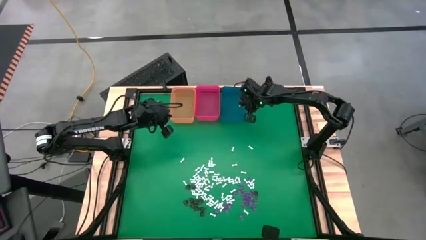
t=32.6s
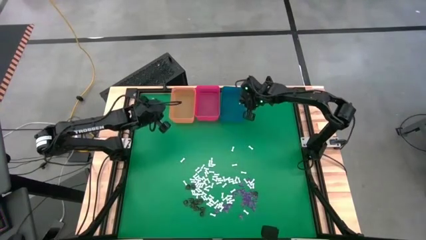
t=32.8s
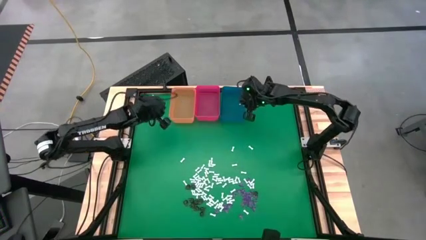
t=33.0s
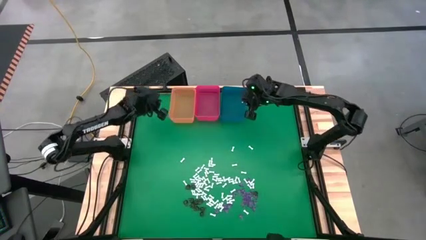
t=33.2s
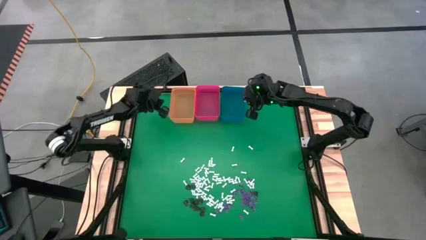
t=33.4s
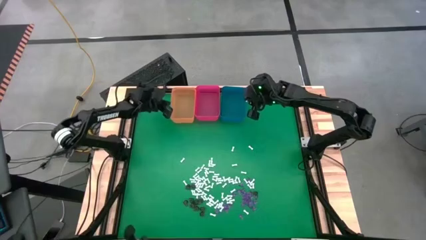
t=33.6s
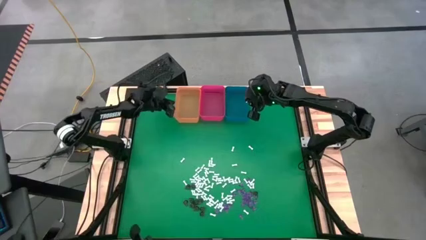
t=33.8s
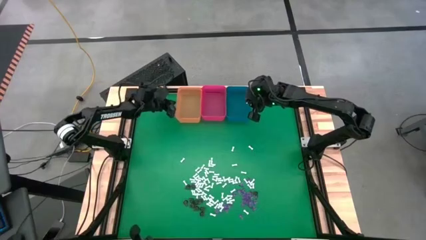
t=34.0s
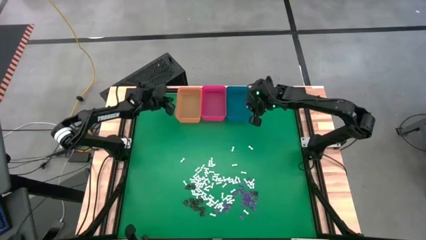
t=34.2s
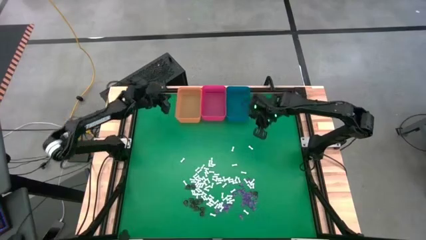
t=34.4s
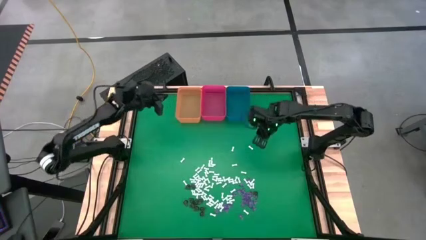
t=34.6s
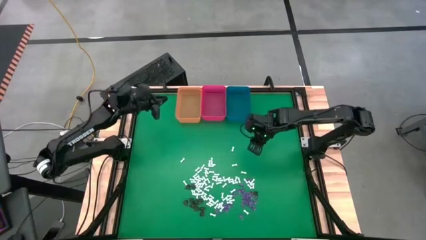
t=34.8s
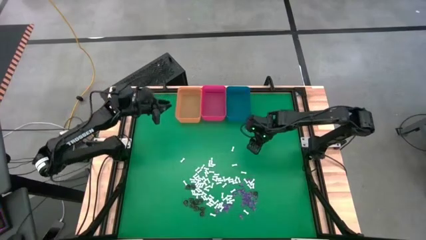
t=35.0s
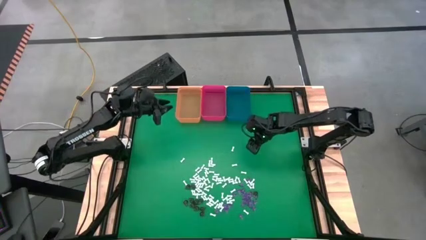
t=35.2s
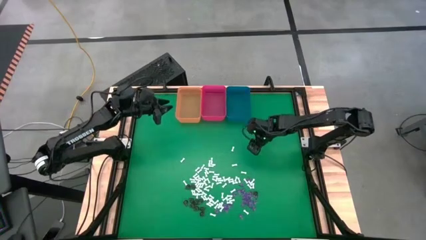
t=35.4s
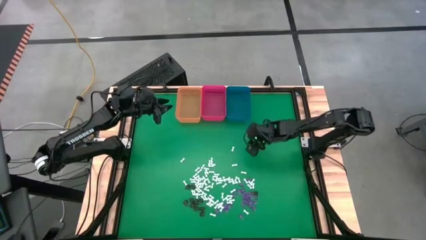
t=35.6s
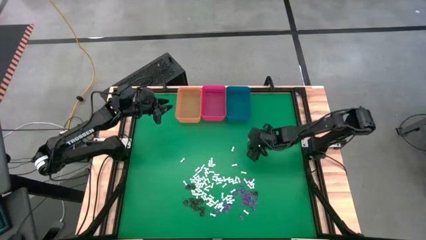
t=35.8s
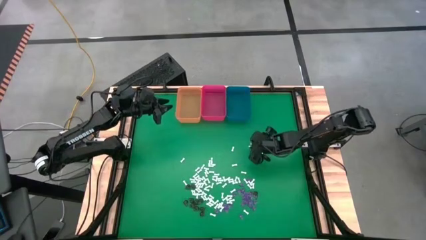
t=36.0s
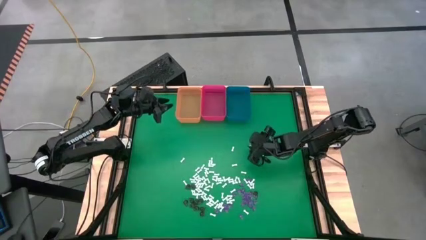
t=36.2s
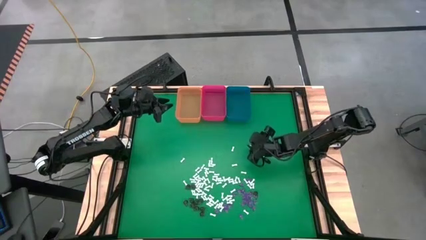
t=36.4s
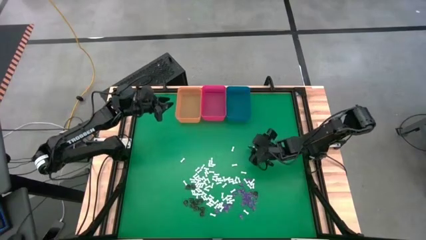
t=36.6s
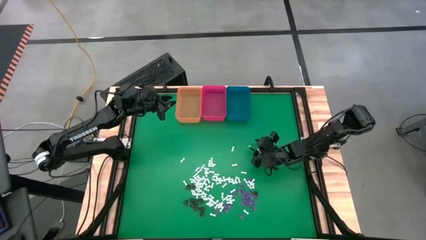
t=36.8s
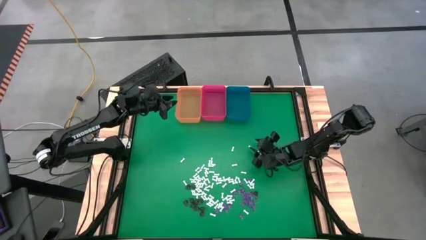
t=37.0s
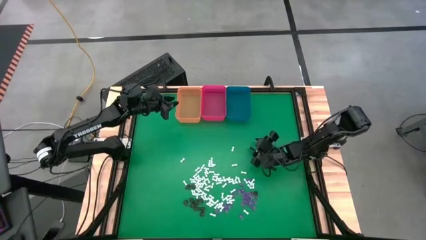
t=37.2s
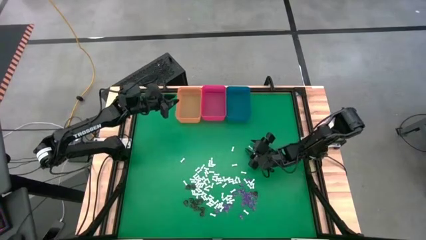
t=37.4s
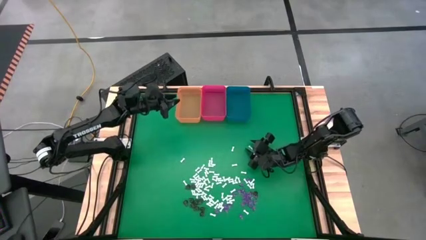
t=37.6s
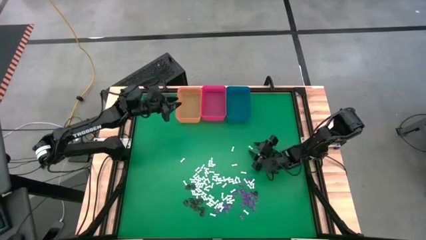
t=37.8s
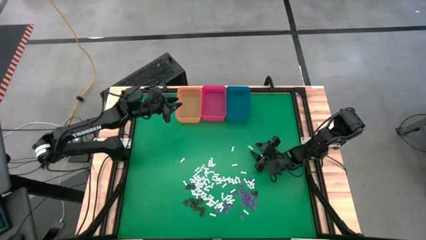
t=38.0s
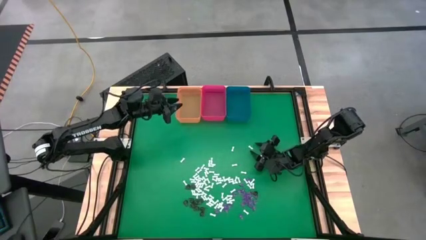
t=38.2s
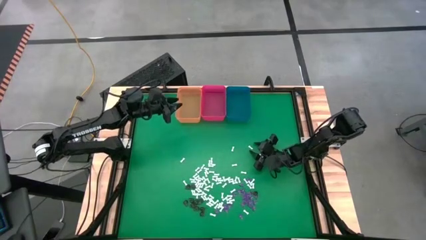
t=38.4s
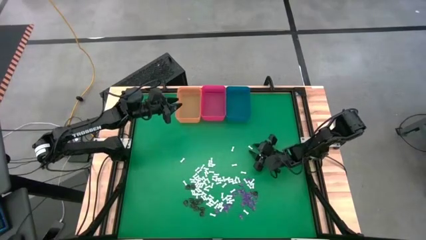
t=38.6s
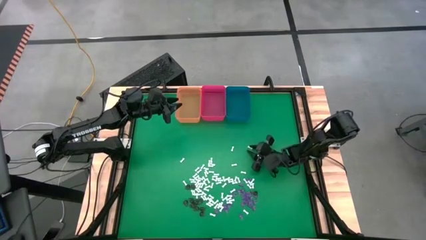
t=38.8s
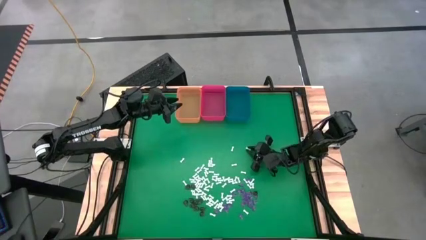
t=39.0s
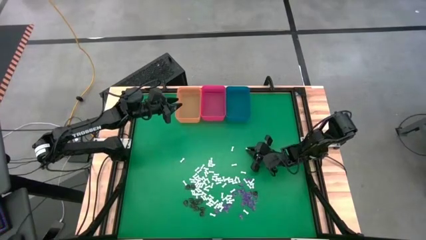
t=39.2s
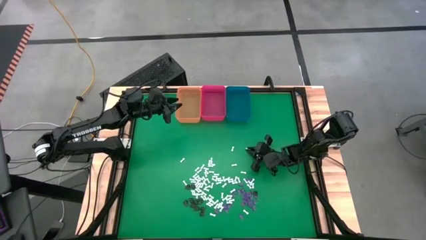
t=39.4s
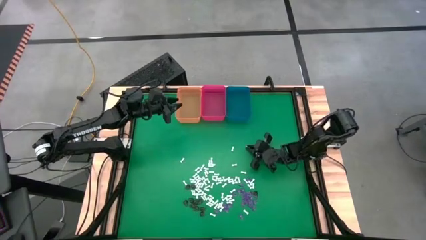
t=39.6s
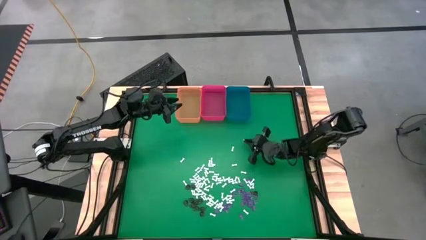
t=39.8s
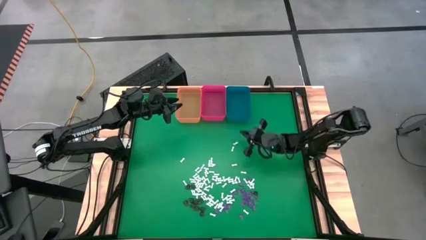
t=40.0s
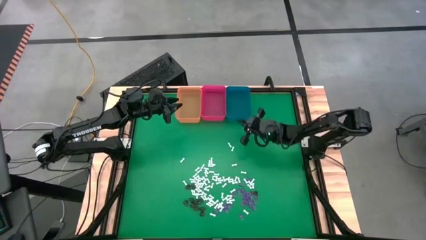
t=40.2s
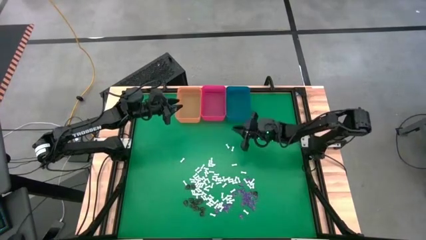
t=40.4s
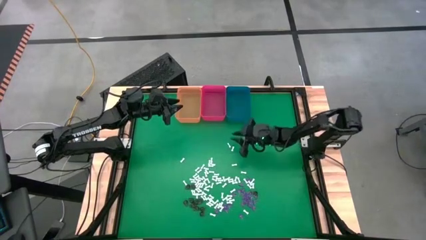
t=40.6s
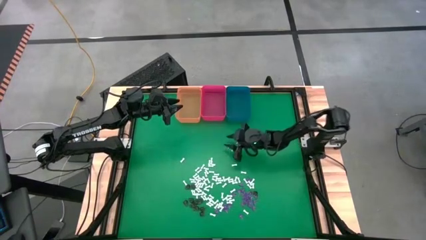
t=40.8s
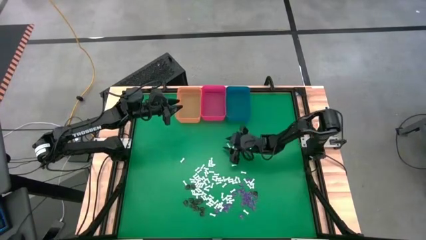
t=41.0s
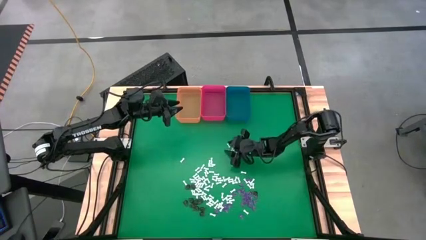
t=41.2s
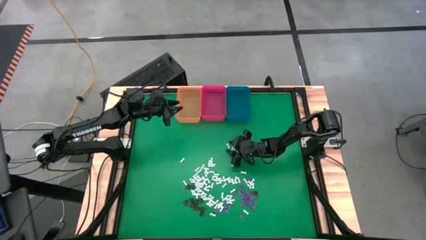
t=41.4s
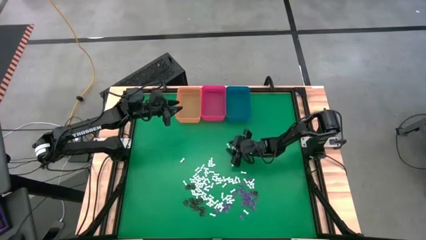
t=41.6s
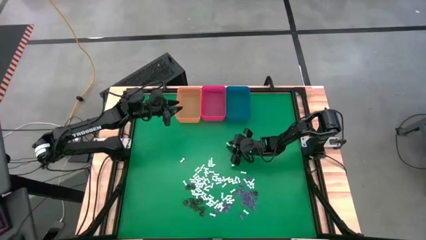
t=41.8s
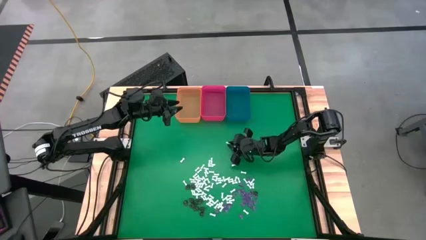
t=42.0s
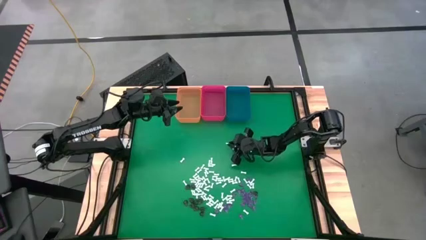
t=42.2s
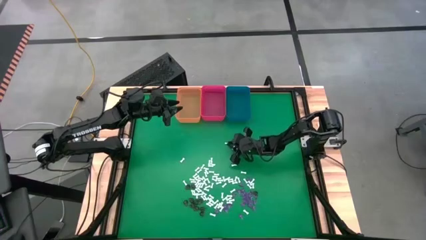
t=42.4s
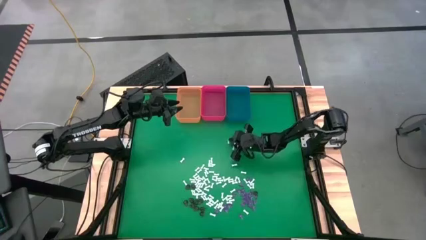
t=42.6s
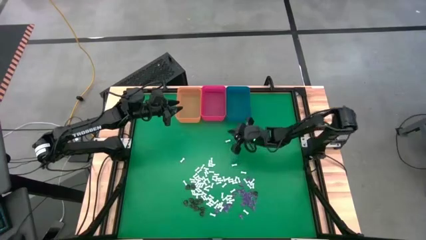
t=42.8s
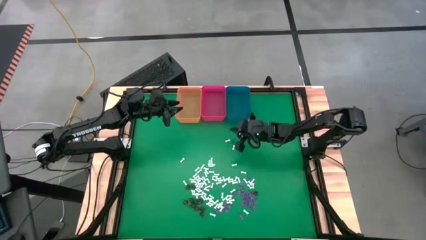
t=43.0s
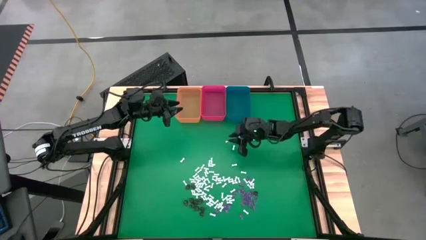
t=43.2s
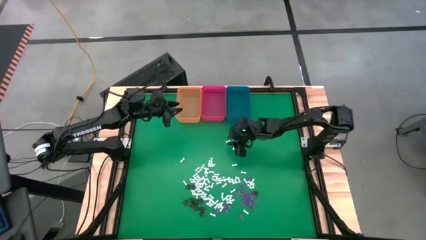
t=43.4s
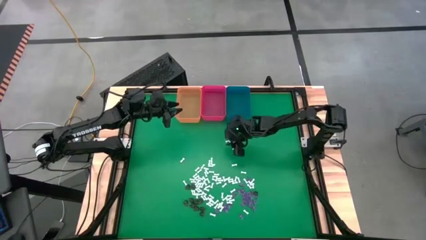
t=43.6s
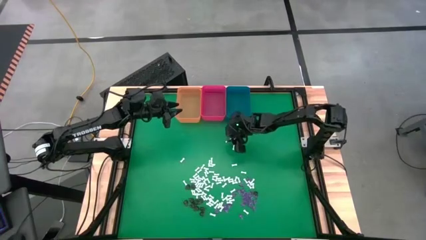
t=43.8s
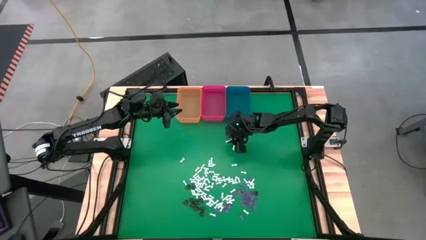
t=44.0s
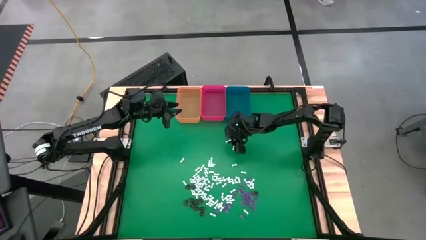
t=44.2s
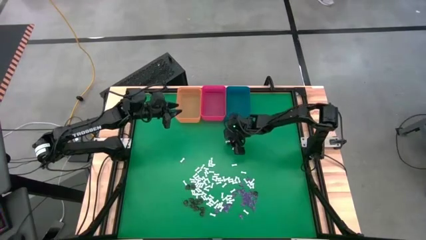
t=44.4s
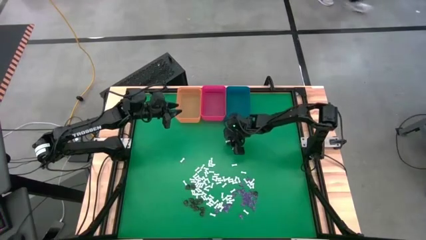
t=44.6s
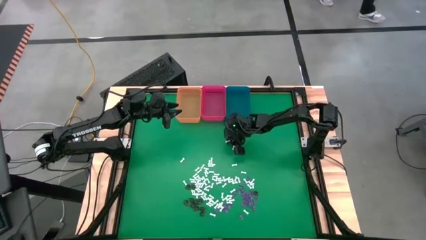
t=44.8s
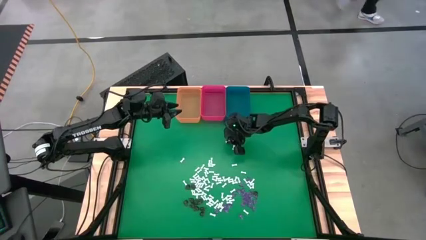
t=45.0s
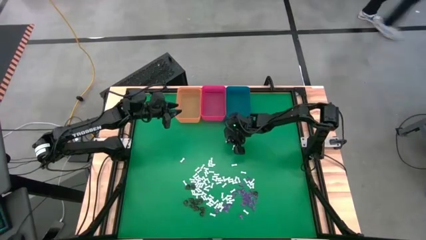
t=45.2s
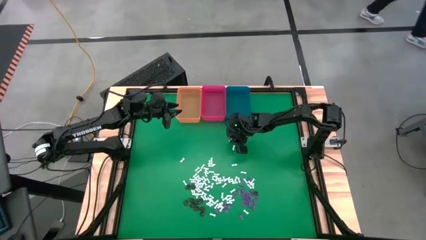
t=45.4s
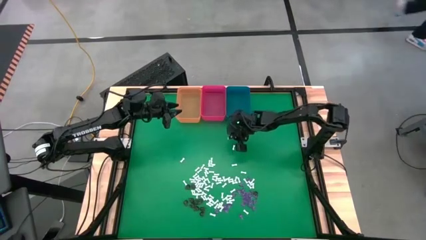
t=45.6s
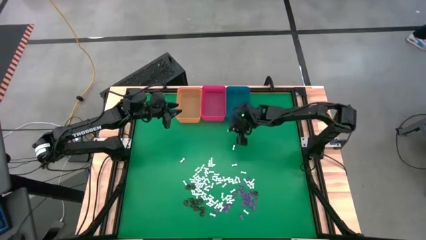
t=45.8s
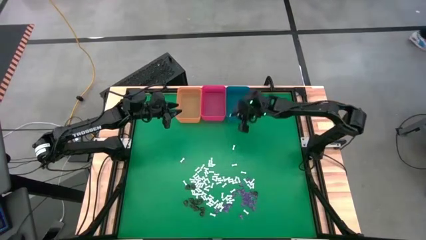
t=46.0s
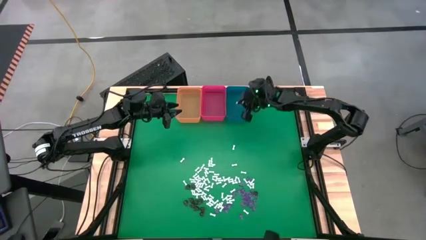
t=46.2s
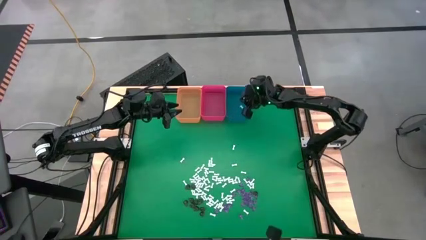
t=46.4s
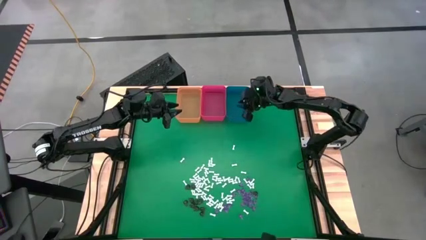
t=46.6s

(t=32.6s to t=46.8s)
Task: Sort Halloween decoration
Put the white bone toy into the blue bin

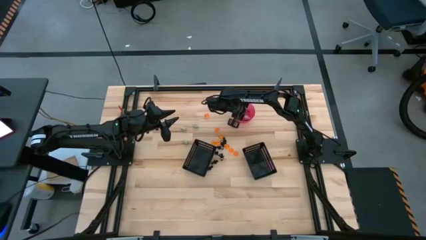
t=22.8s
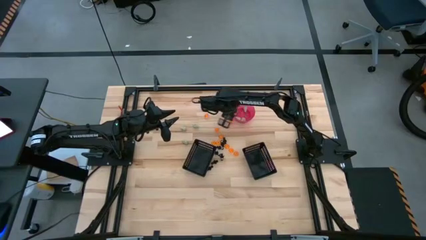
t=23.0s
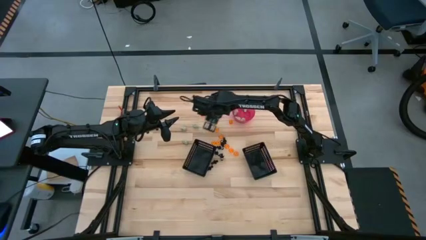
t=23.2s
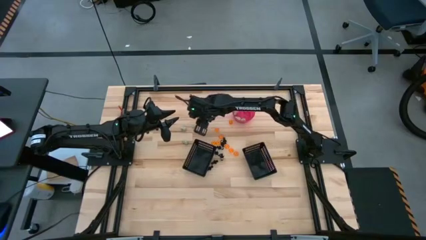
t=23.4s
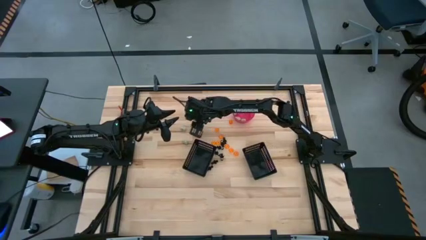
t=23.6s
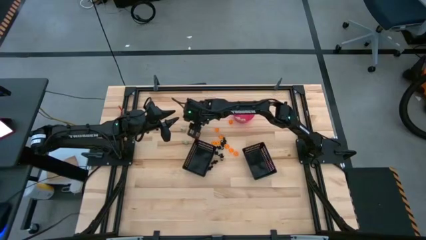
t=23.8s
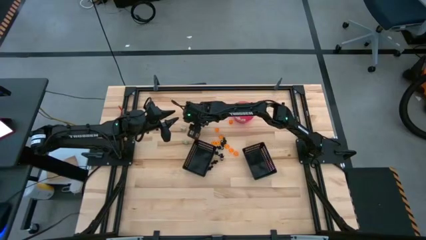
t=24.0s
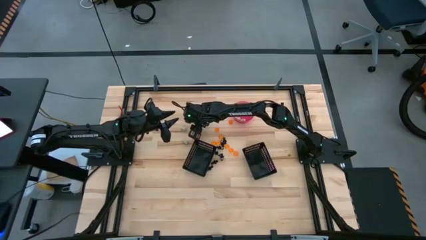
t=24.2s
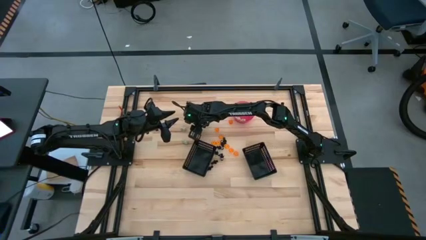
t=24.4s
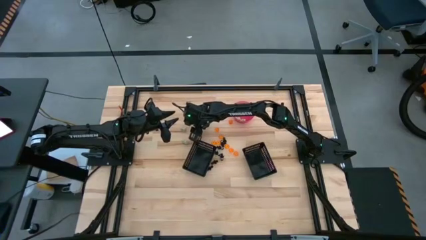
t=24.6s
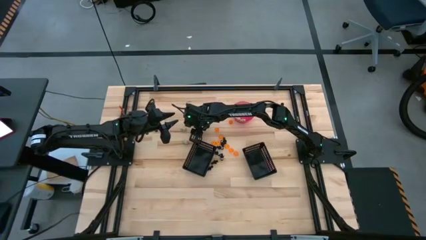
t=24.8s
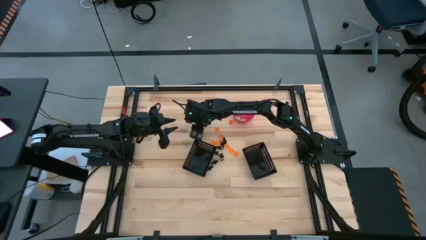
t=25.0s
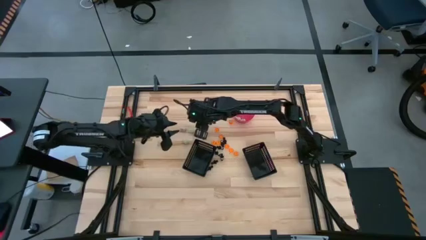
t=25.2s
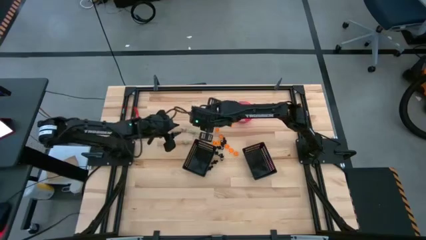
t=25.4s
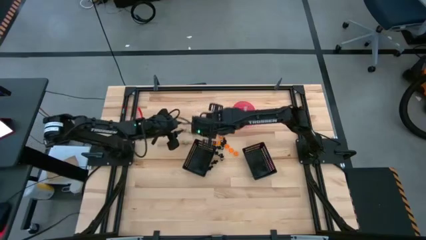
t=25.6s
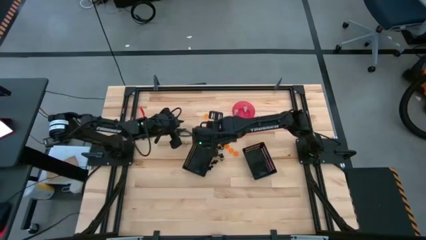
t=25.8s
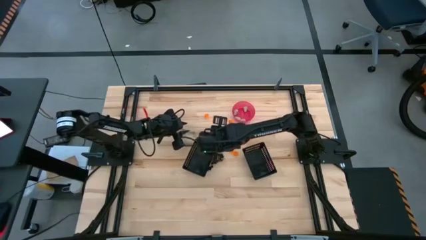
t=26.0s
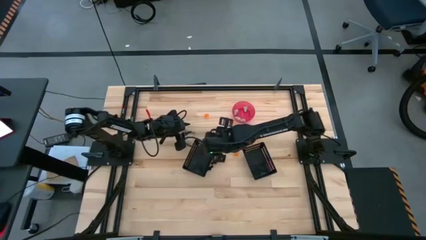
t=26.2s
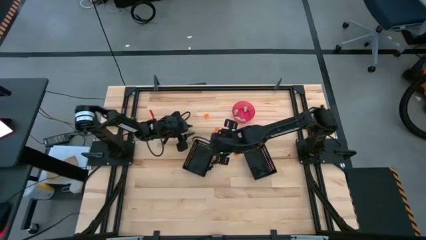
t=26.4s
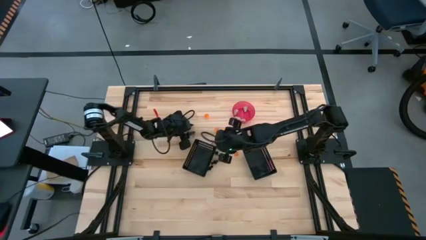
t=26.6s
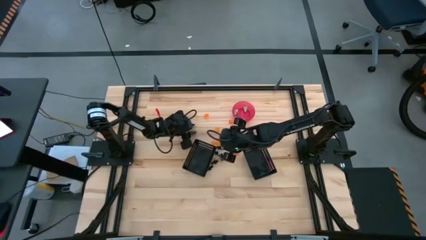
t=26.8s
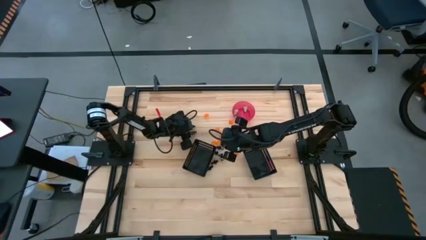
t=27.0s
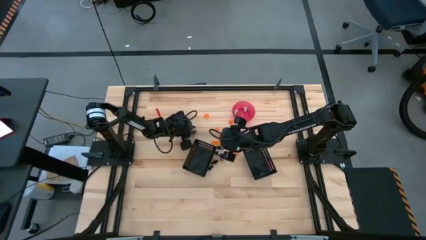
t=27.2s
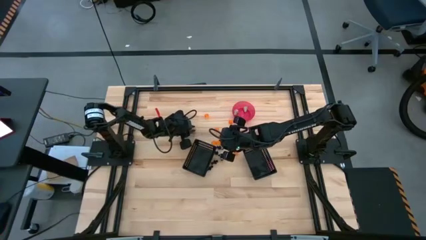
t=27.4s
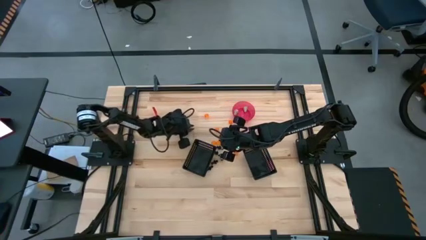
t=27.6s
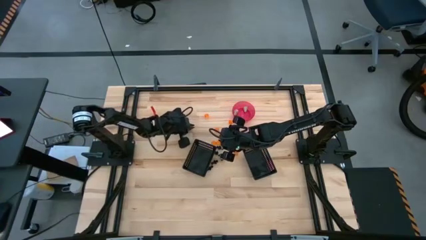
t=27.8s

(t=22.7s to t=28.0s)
Task: Sort Halloween decoration
Put the white skull toy into the pink container
